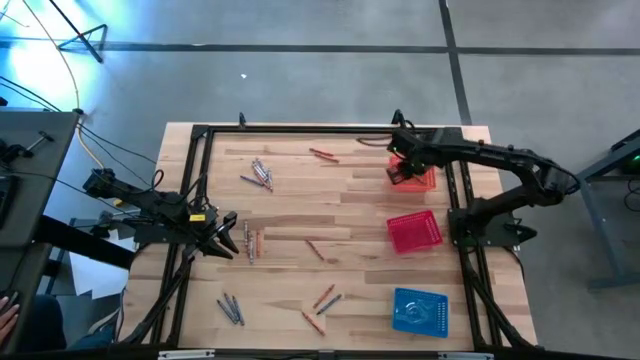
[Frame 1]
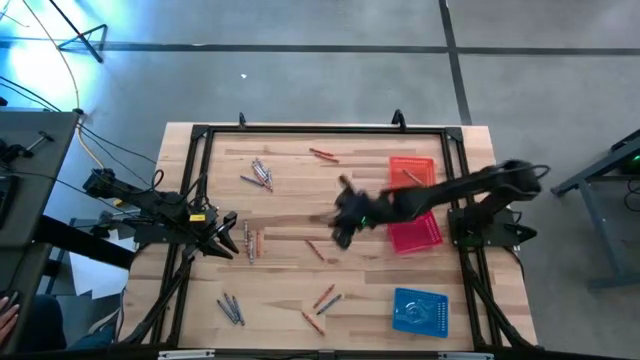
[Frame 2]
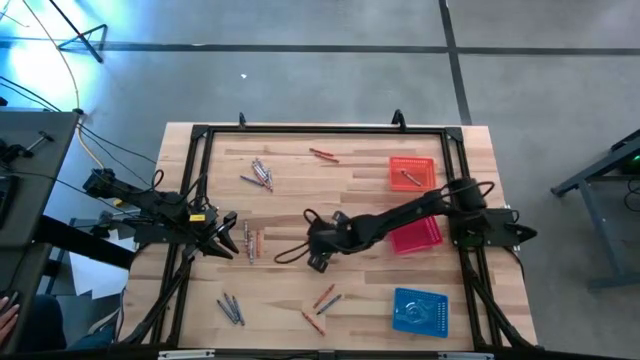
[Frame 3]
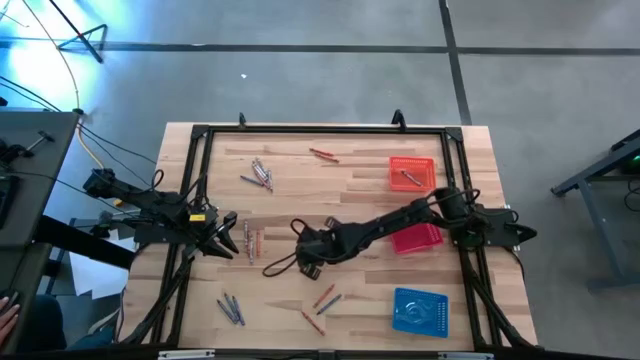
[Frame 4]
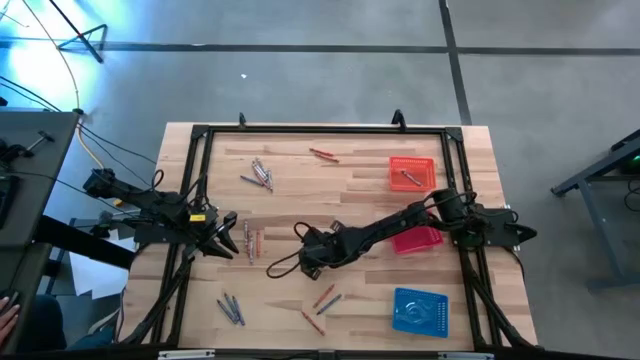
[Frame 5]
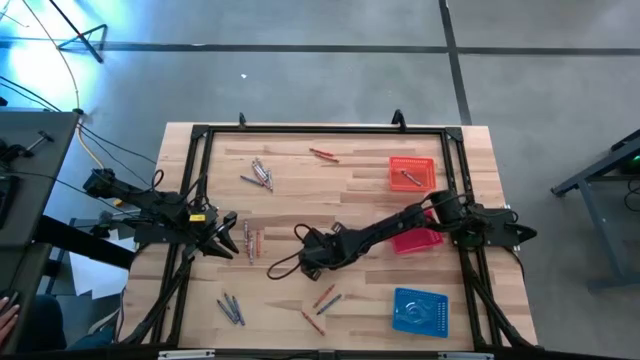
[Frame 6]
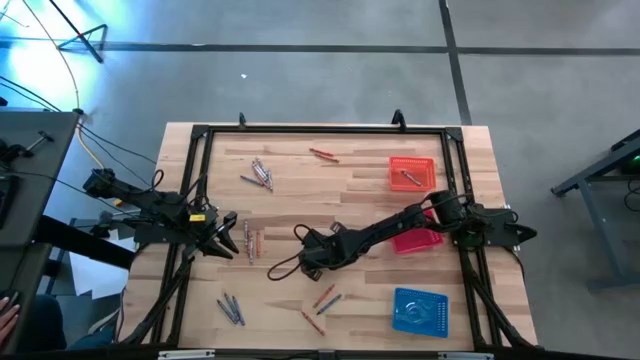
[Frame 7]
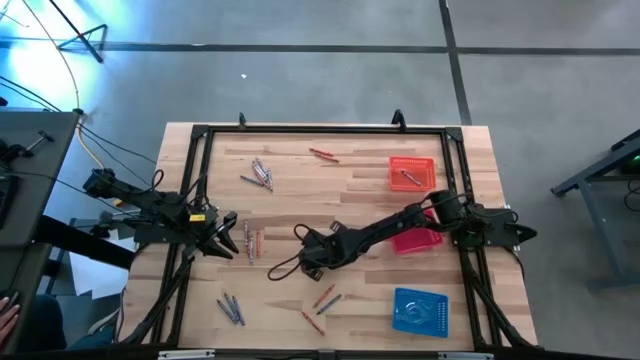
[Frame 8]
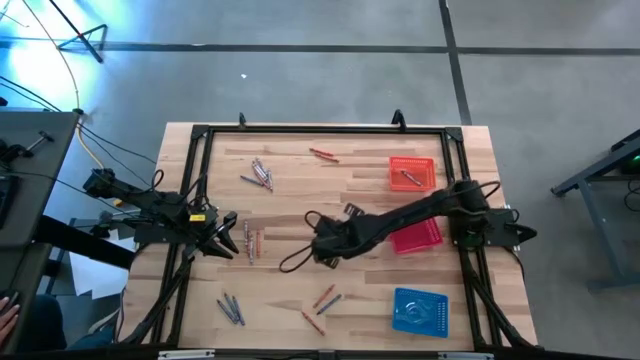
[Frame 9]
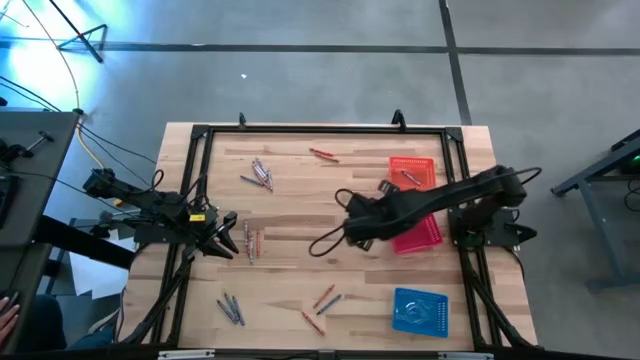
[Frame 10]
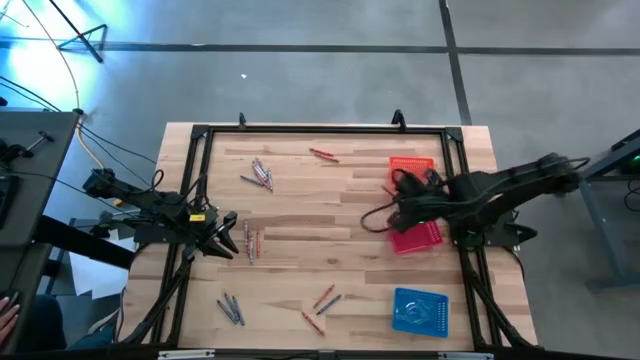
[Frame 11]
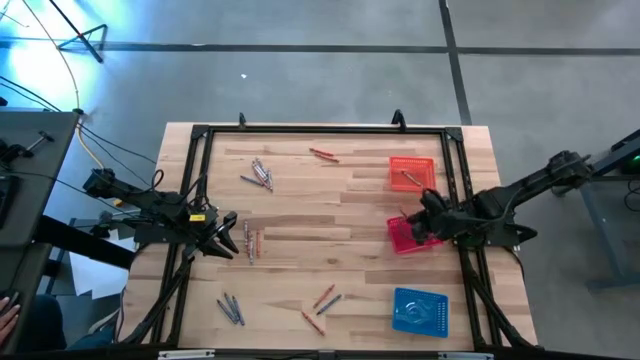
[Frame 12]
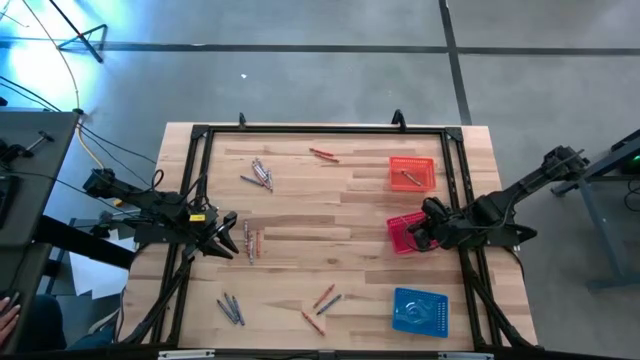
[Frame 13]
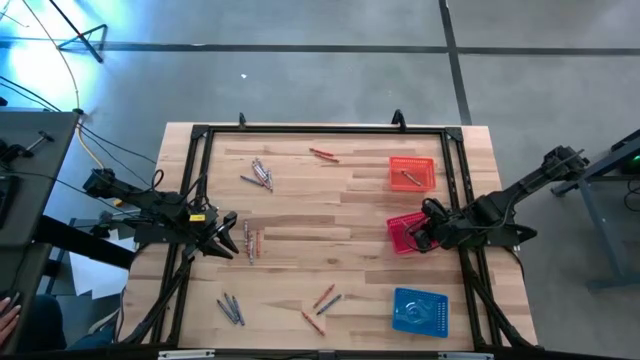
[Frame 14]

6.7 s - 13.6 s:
Task: Sort crayons
Put the orange crayon into the red bin

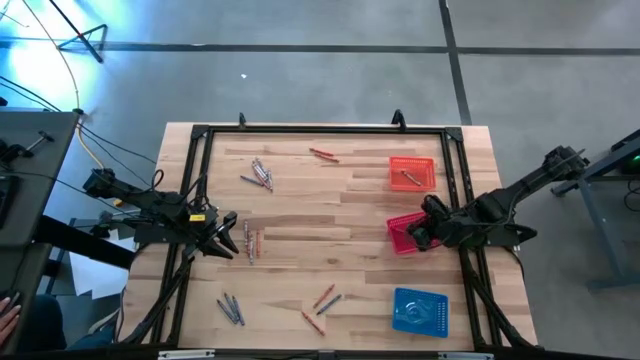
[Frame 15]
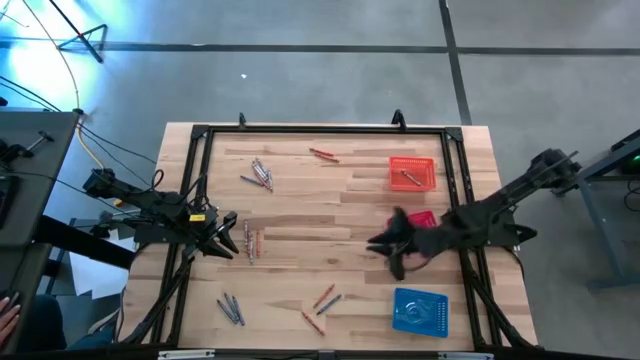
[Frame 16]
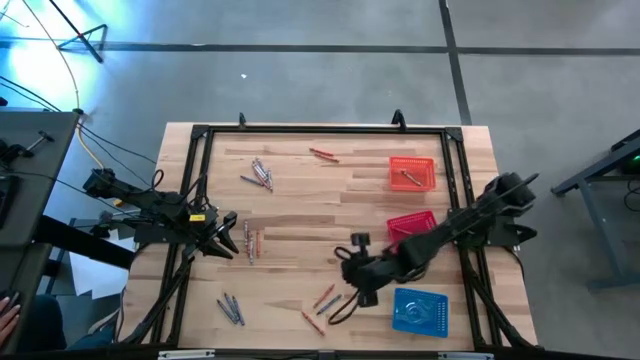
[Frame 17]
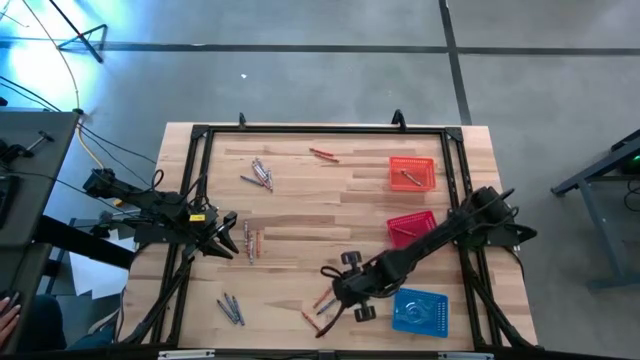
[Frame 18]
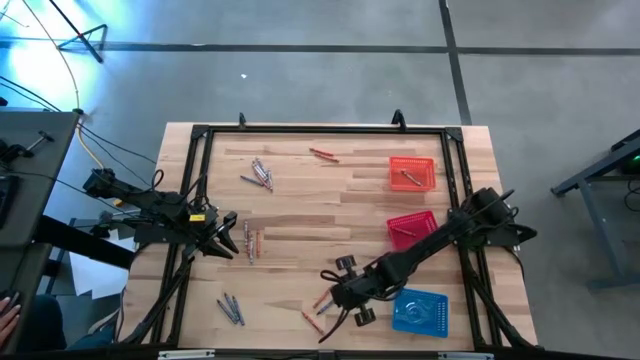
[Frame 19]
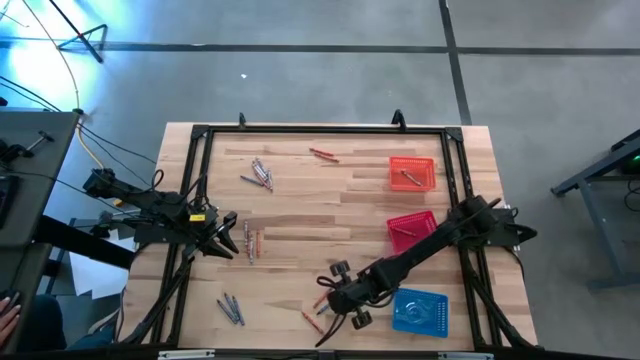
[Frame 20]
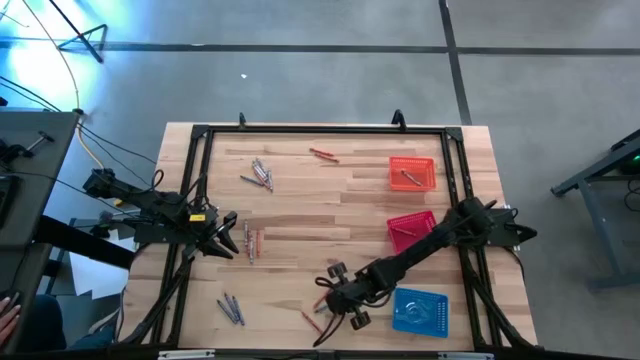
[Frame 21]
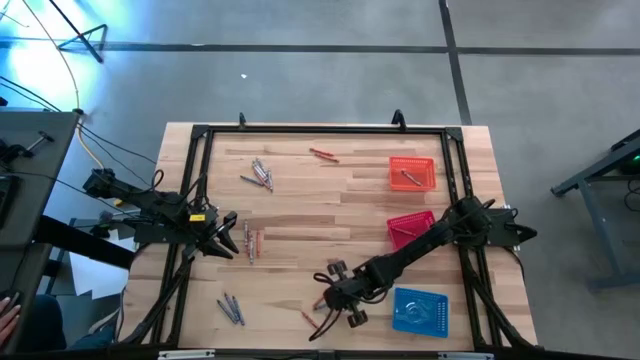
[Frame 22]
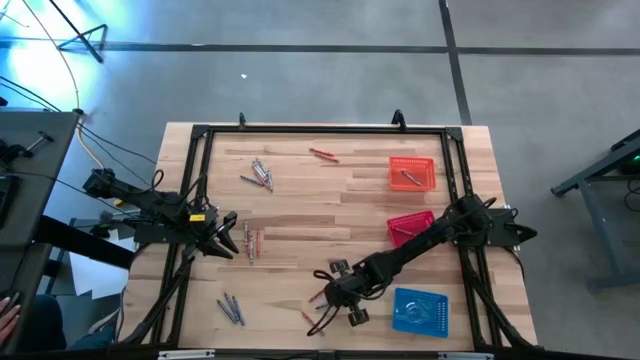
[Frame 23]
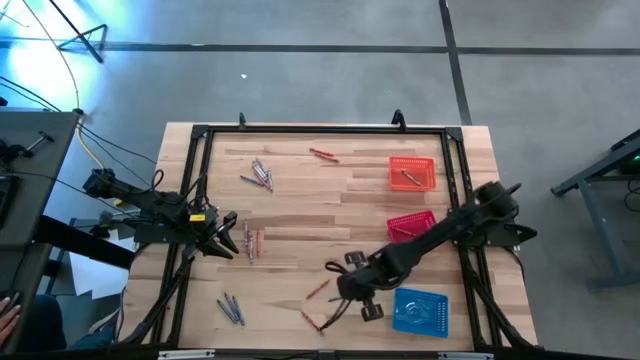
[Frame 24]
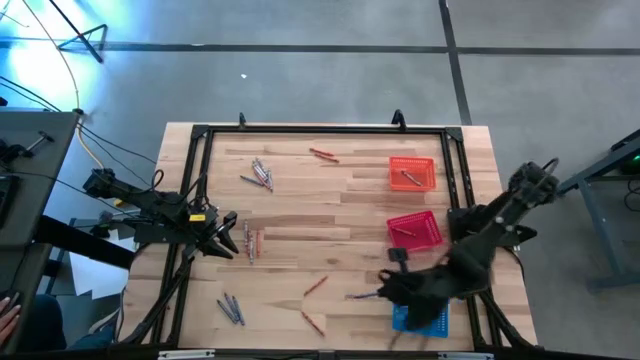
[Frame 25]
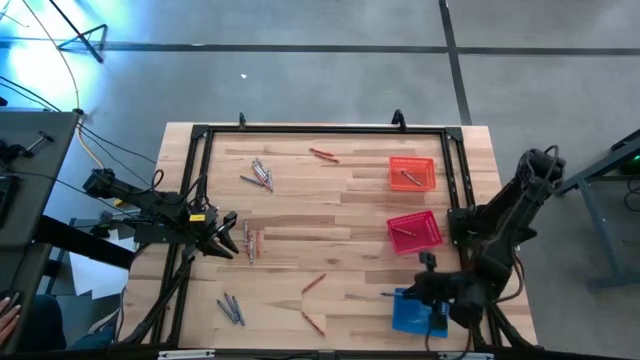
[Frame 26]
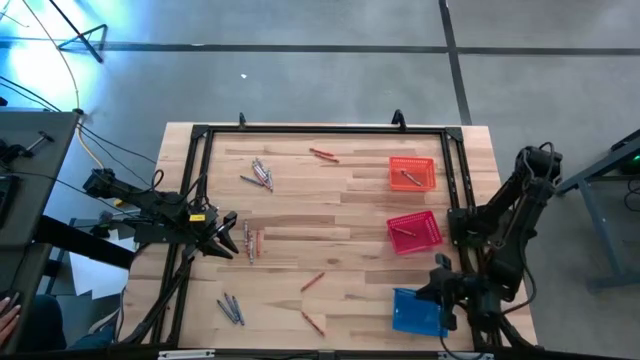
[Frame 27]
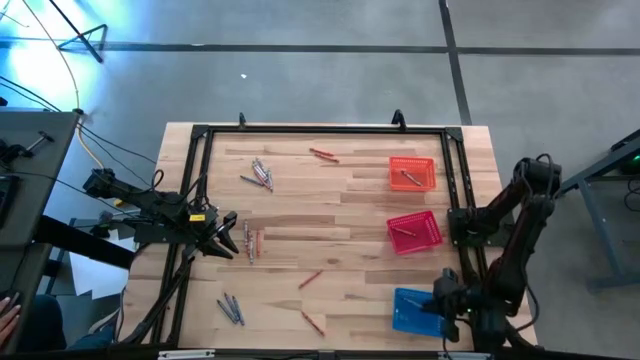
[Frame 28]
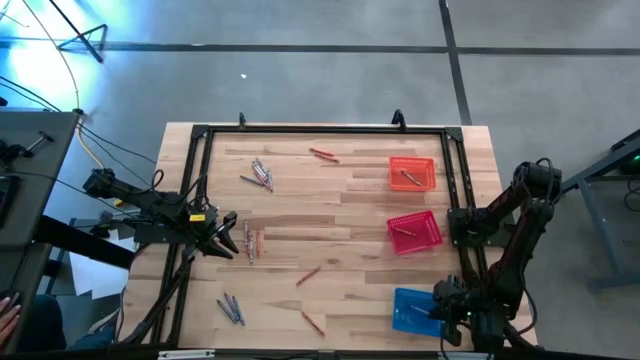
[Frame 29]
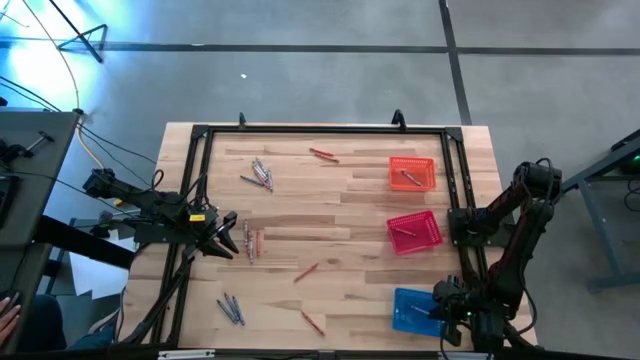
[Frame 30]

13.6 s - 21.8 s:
Put the blue crayon into the blue bin

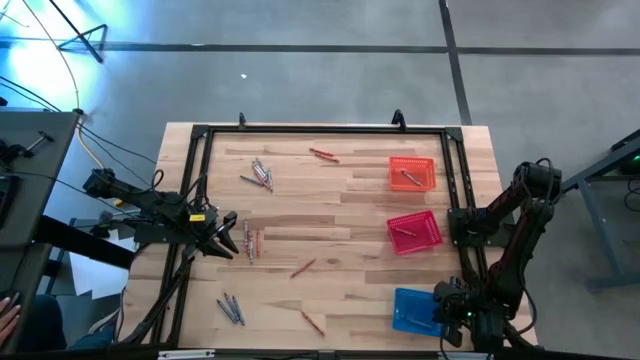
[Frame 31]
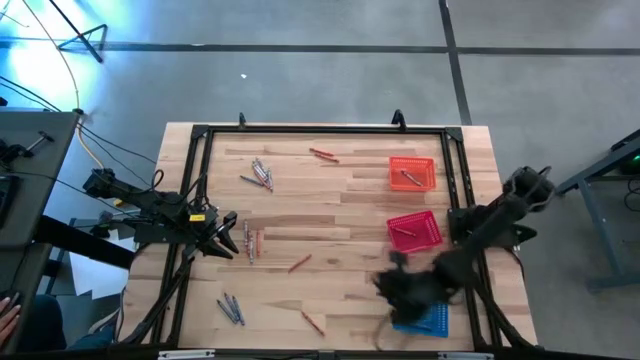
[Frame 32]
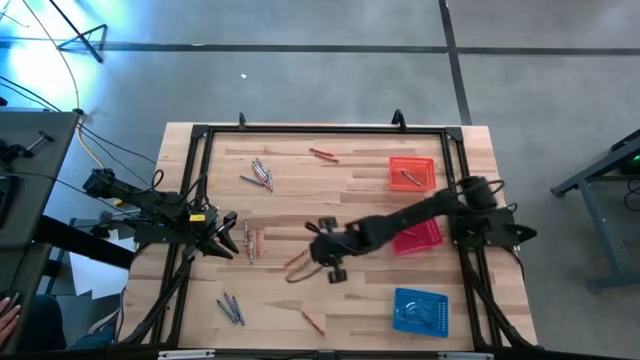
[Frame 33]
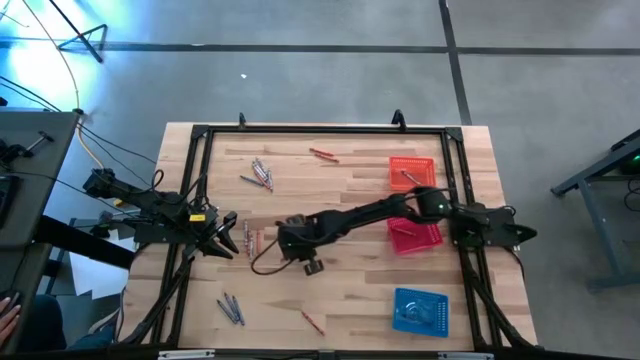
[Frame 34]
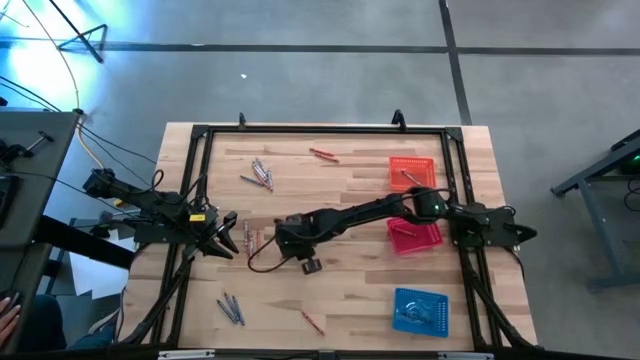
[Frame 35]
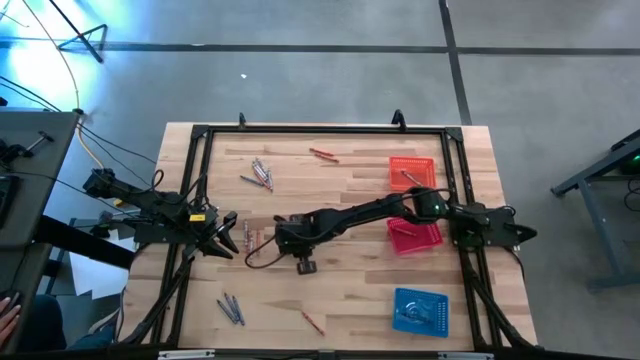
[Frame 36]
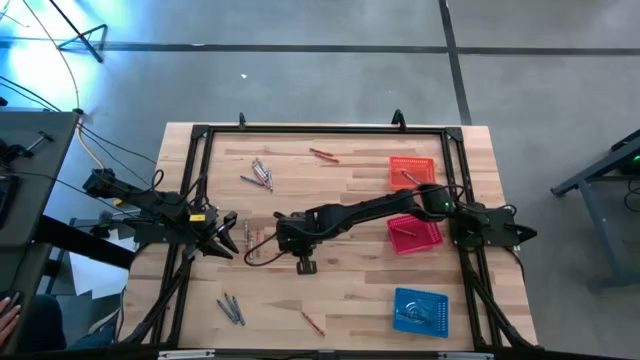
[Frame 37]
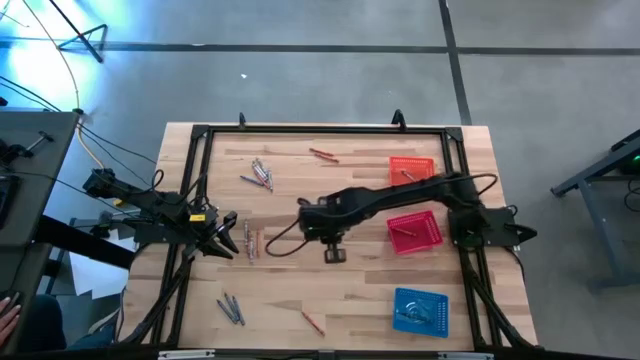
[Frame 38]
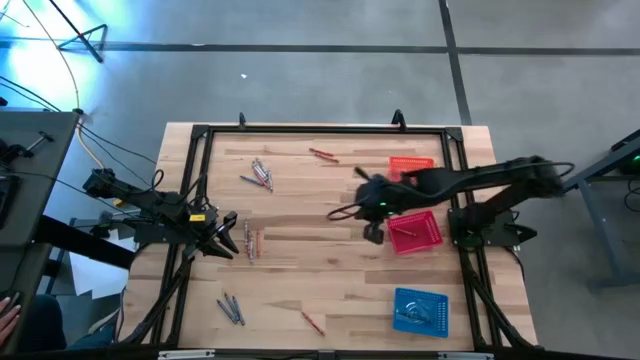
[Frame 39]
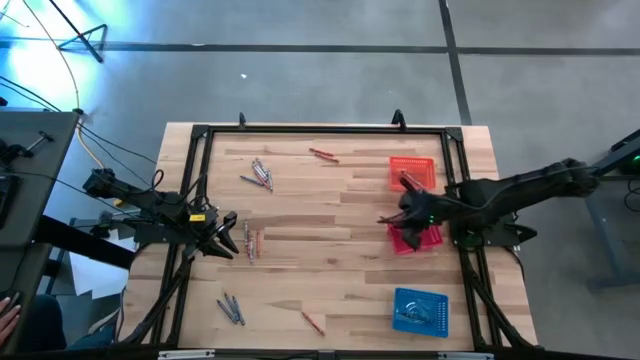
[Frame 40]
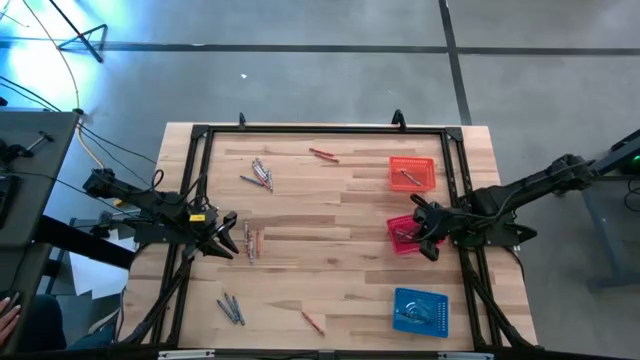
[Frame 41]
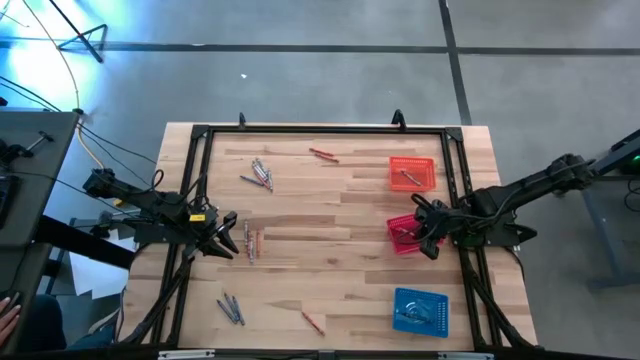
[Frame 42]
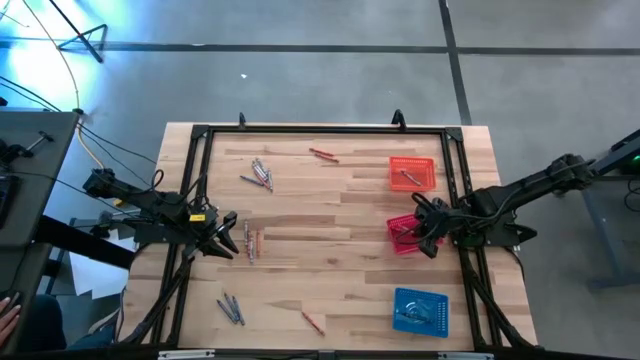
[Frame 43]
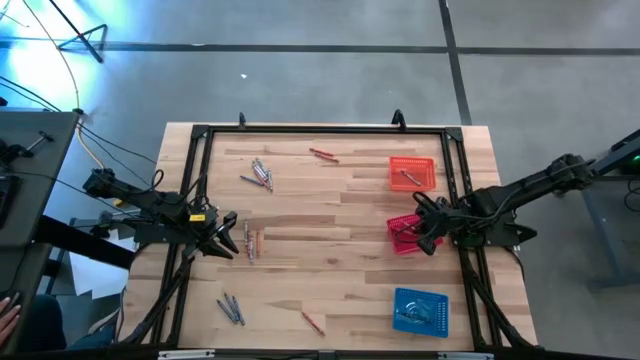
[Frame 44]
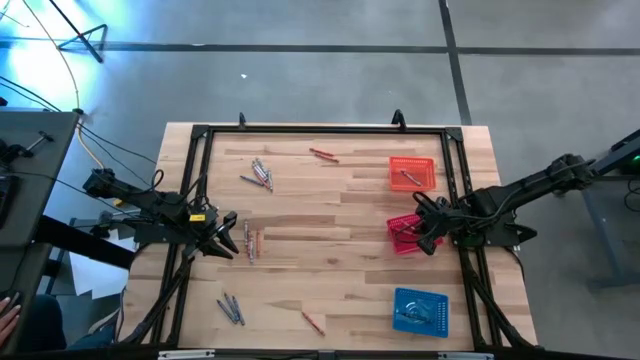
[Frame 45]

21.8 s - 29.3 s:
Put the orange crayon into the red bin
